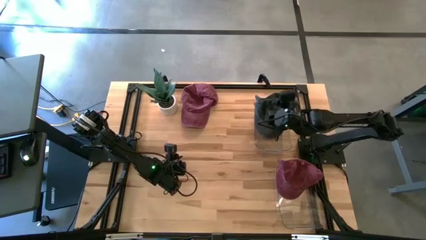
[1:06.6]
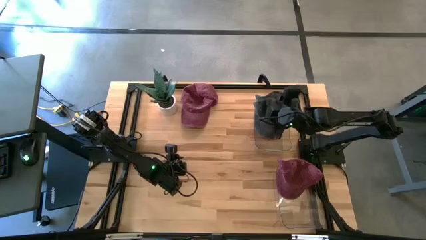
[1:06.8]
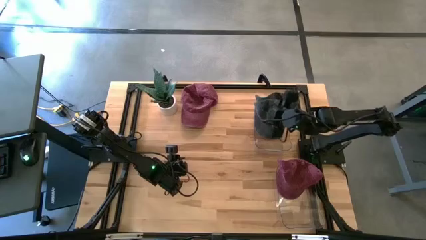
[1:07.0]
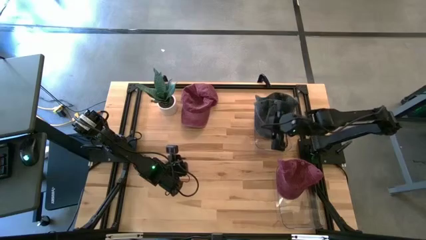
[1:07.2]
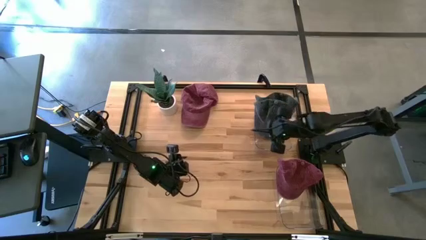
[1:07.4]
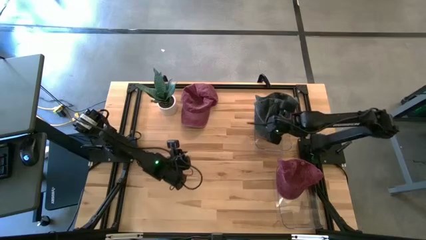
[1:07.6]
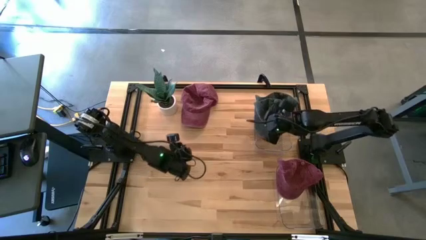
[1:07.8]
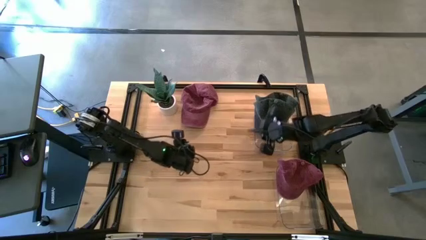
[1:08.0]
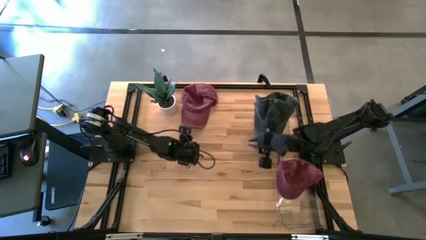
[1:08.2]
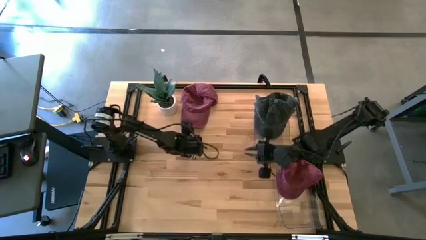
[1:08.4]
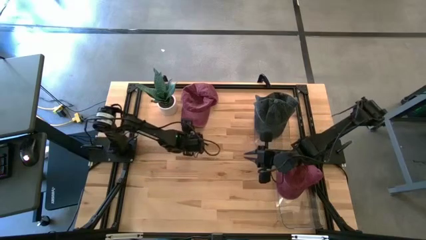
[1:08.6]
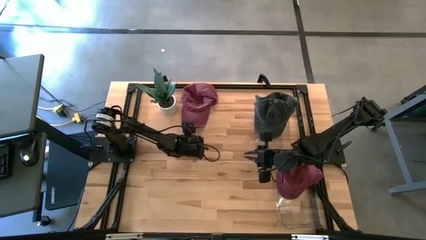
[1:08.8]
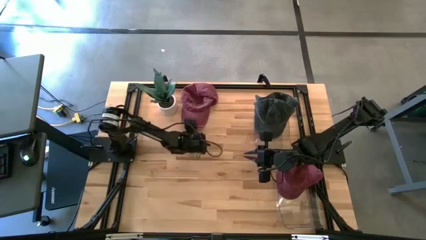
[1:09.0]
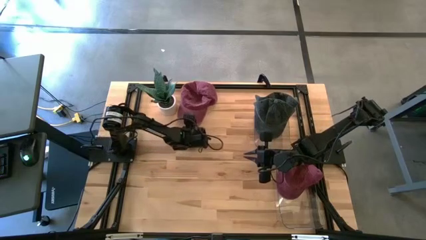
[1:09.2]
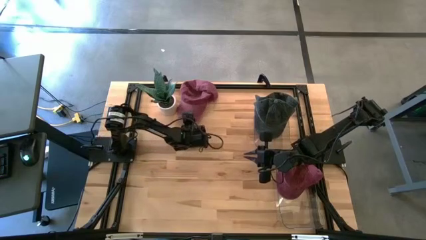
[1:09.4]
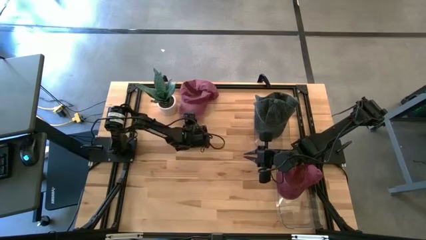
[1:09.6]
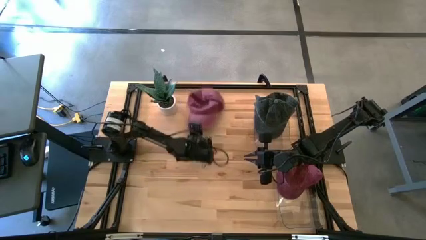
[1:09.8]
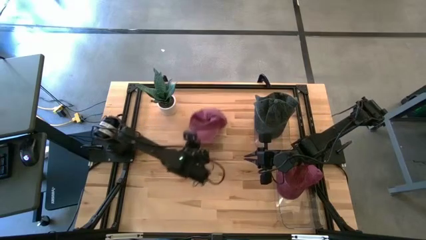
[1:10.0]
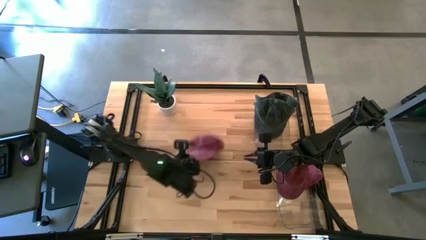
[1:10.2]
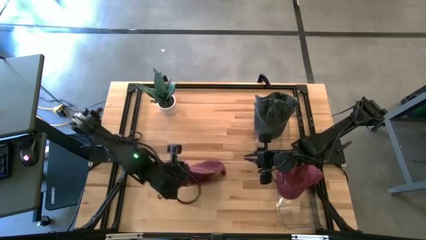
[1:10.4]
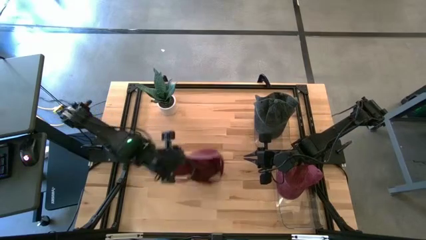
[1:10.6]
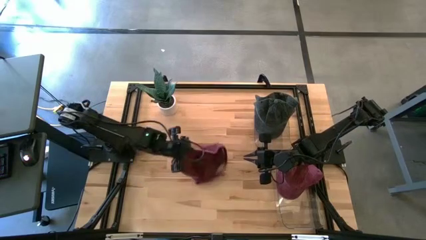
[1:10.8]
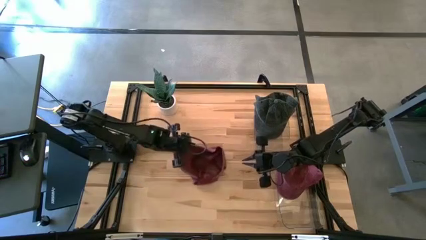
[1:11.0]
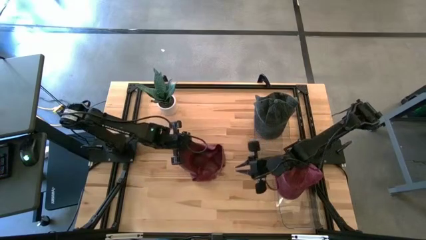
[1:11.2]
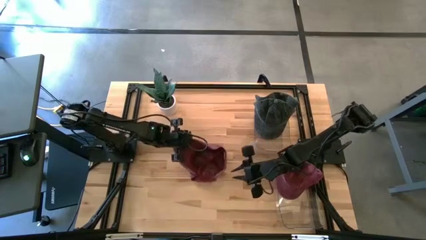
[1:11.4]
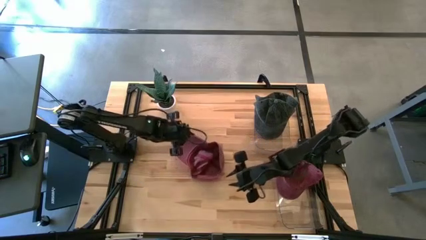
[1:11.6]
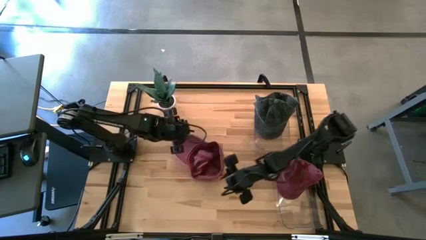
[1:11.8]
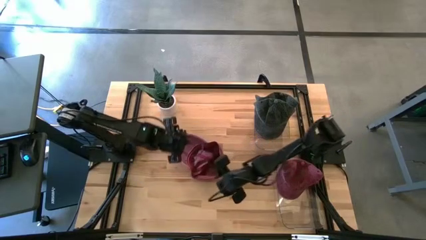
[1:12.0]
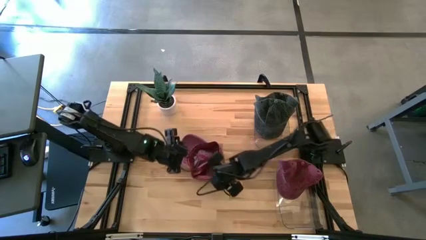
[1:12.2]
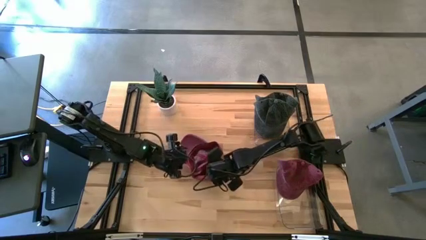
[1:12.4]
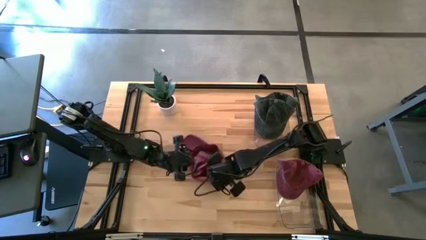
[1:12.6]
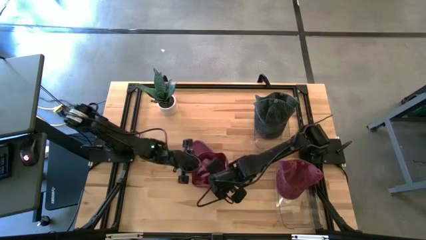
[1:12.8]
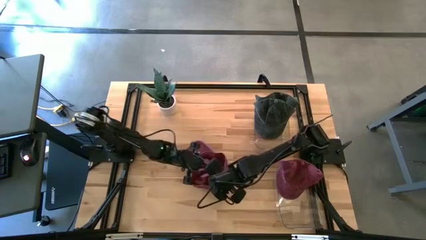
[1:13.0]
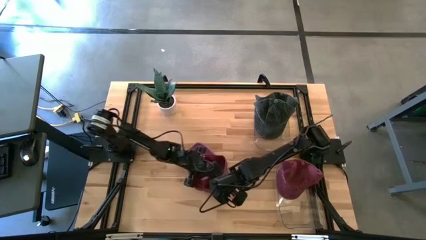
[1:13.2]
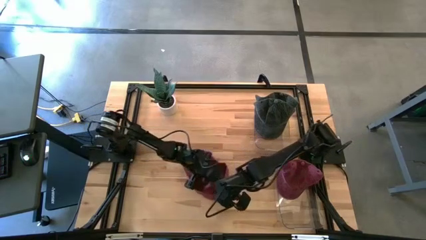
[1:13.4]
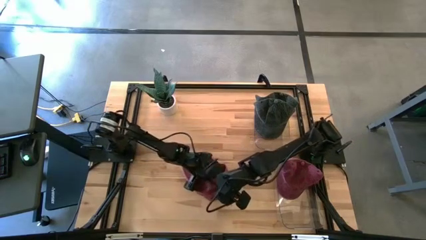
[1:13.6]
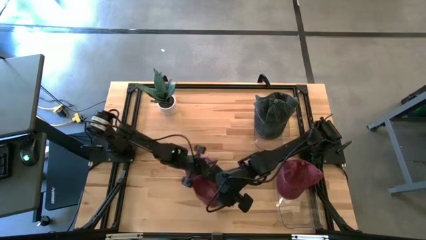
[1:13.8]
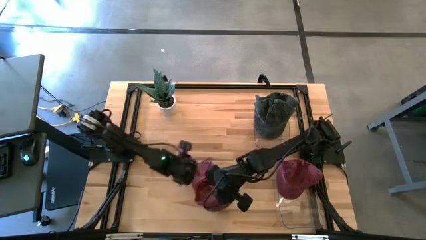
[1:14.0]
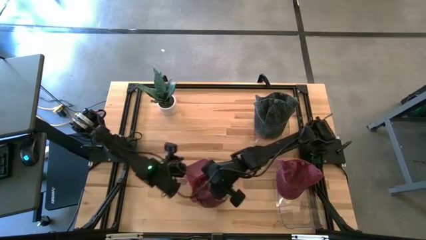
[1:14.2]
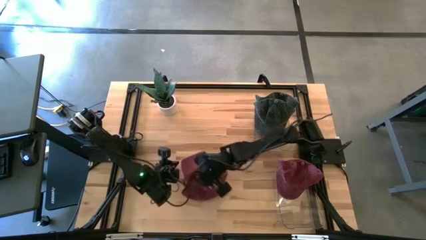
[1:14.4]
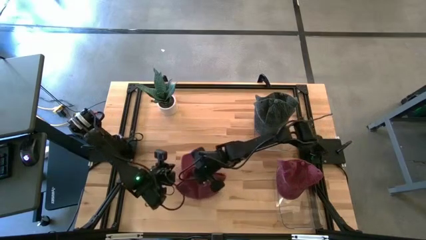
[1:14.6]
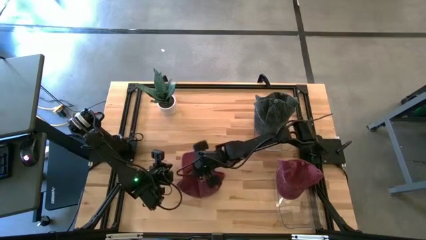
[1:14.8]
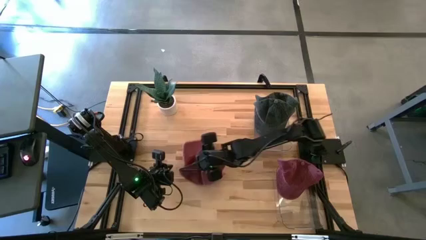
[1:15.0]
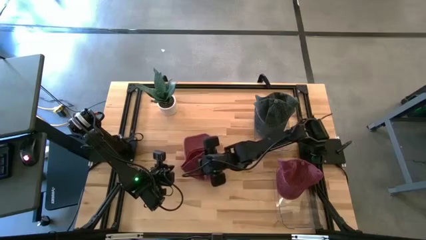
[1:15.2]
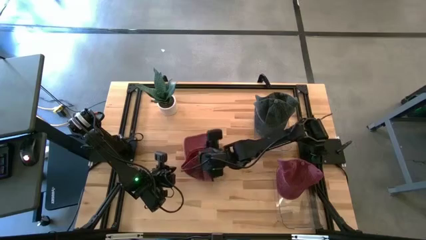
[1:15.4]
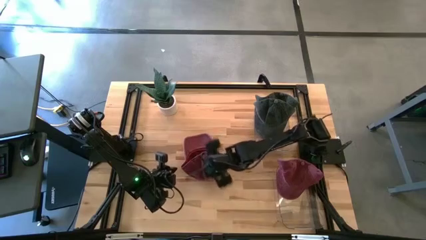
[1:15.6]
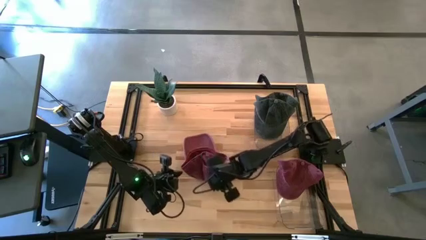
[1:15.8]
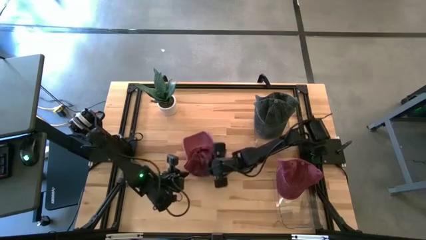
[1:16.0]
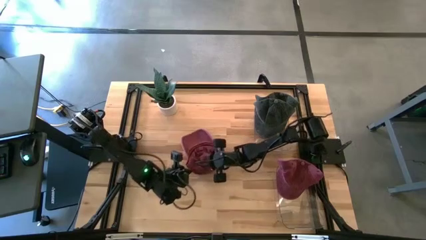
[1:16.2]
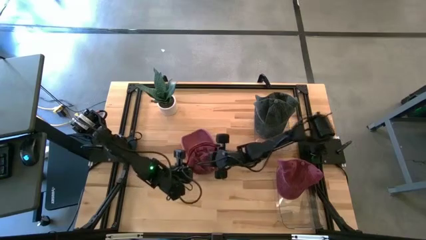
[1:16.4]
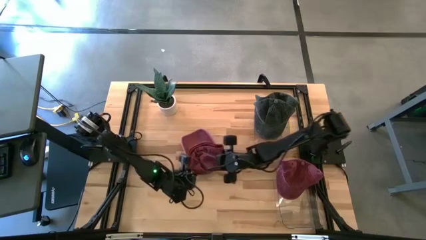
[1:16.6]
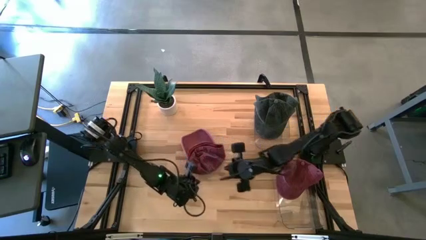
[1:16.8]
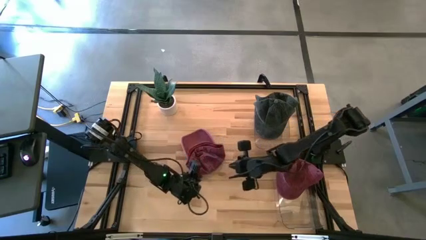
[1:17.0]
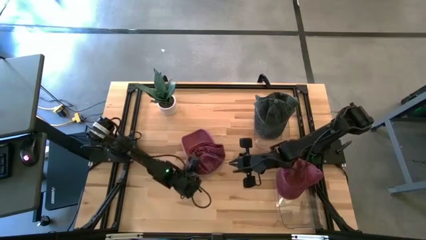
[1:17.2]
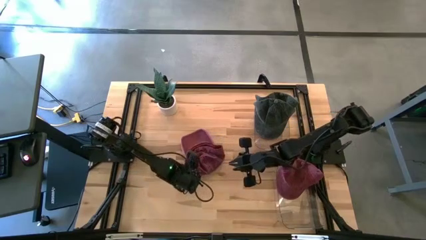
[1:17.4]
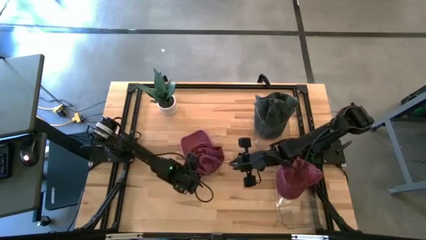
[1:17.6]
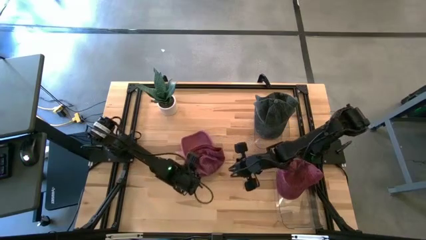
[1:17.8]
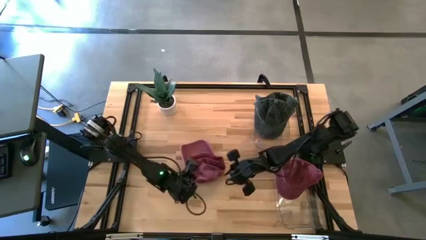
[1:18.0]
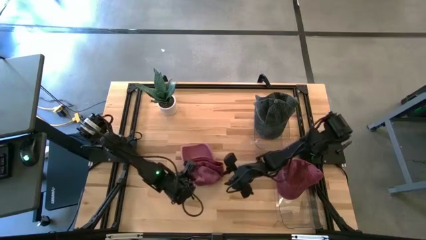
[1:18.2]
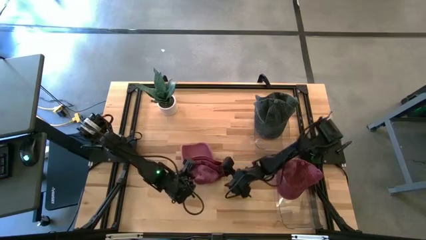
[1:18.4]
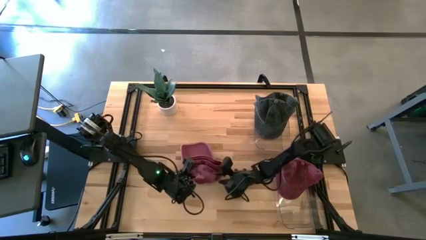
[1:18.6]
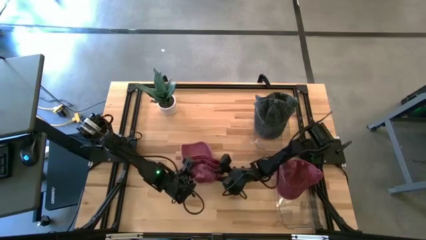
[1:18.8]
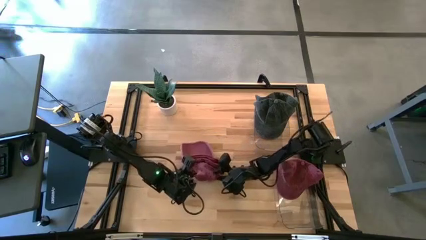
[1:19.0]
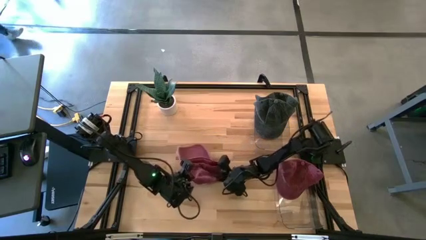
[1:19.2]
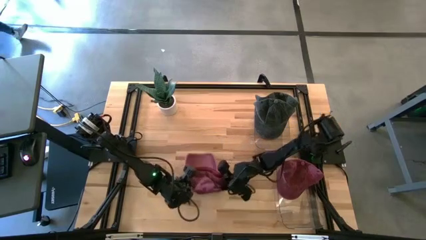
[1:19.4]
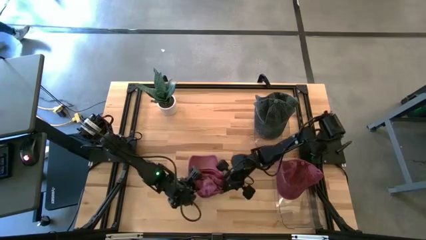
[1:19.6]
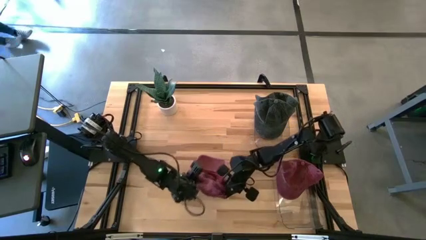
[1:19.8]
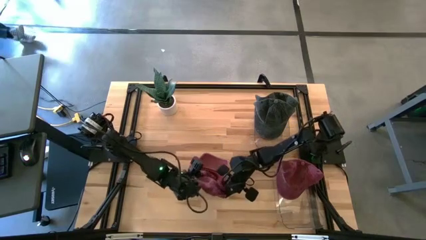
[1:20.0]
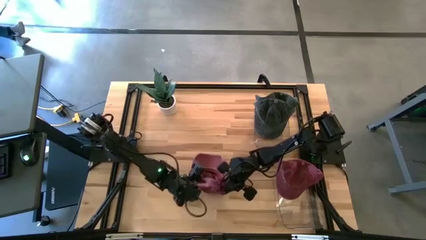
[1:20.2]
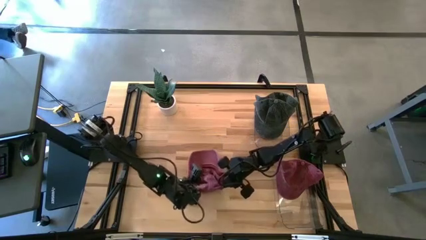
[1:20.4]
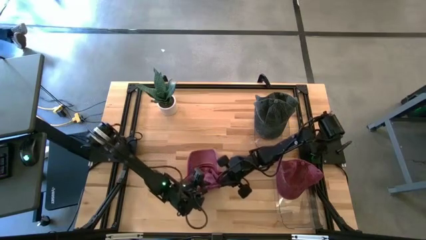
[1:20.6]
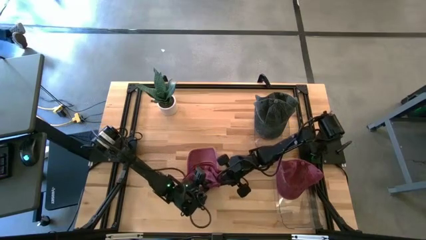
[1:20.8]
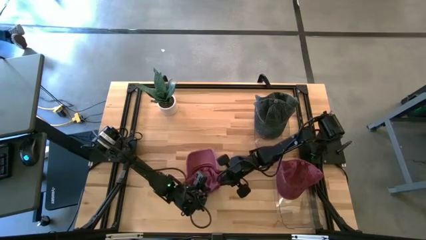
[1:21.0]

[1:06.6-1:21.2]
Task: Pick & Place hat
Put the red cap into the bottom transparent bin
